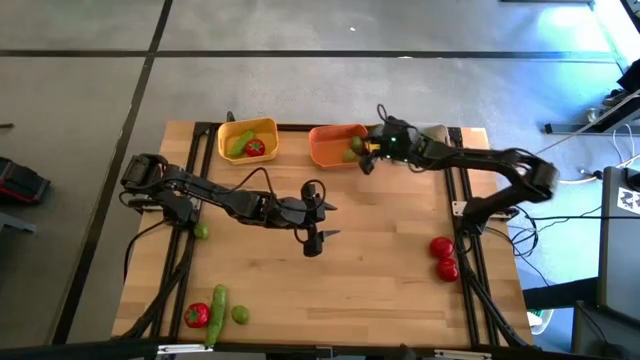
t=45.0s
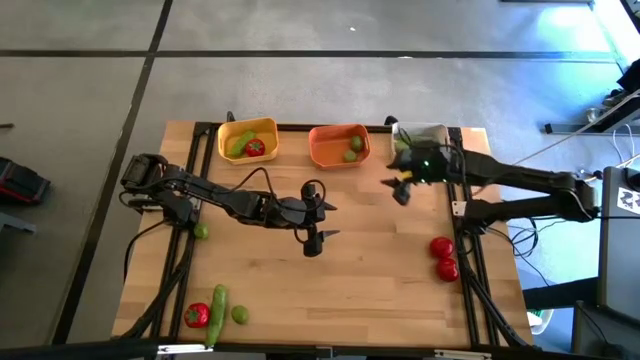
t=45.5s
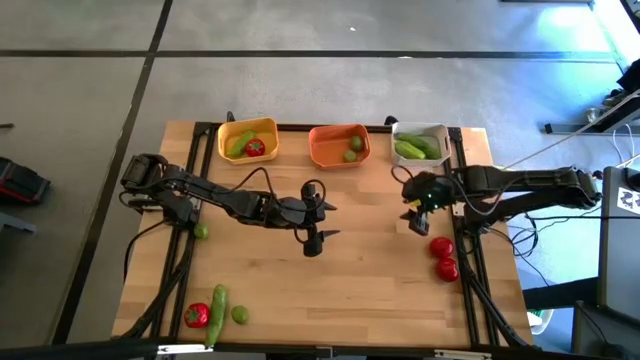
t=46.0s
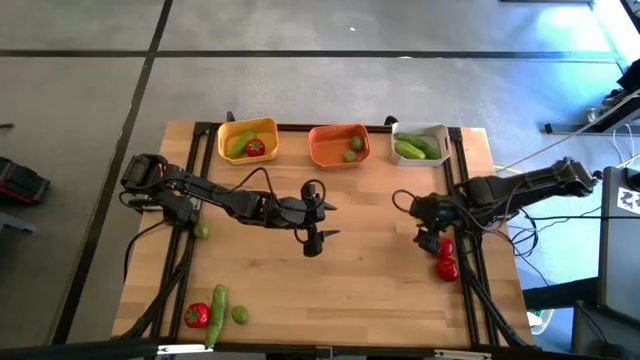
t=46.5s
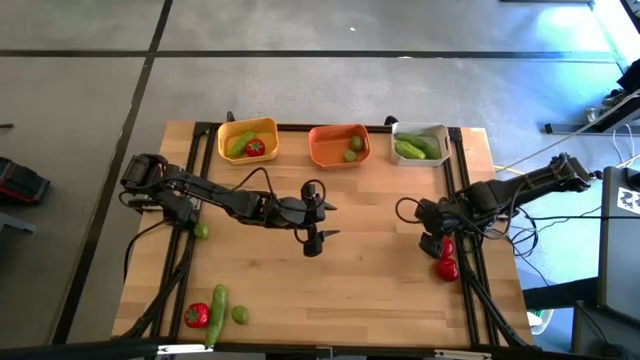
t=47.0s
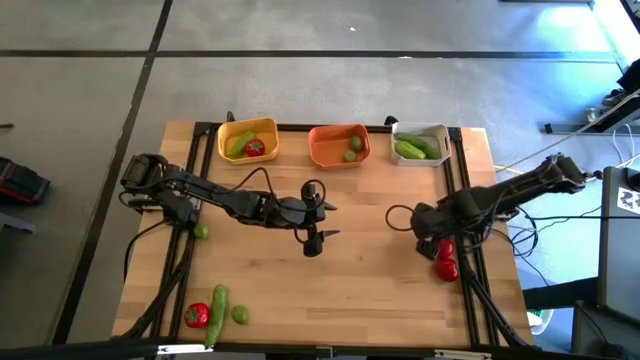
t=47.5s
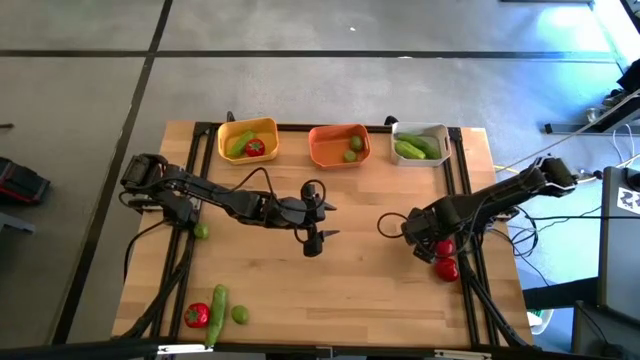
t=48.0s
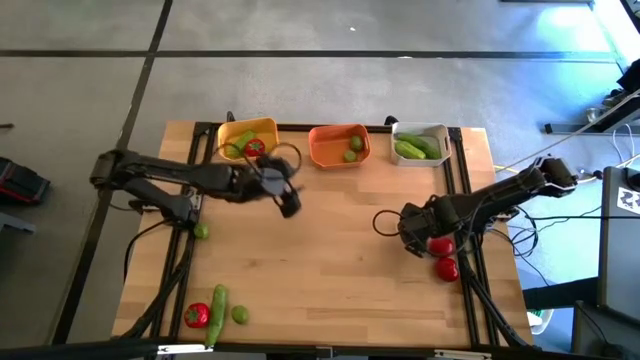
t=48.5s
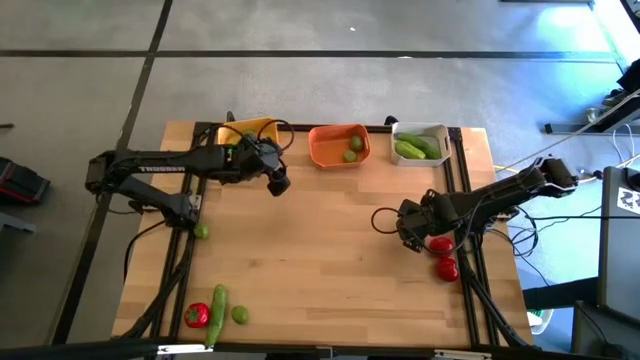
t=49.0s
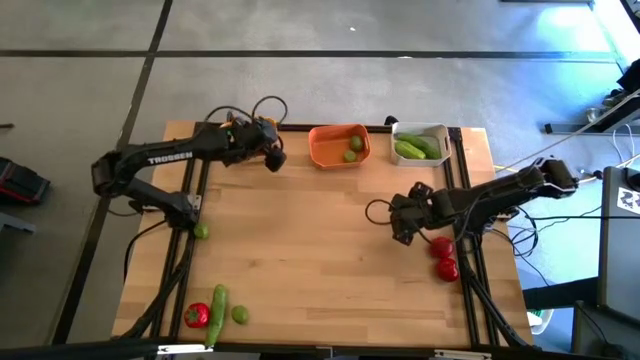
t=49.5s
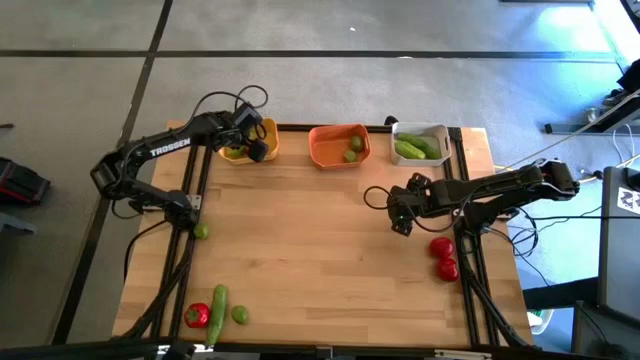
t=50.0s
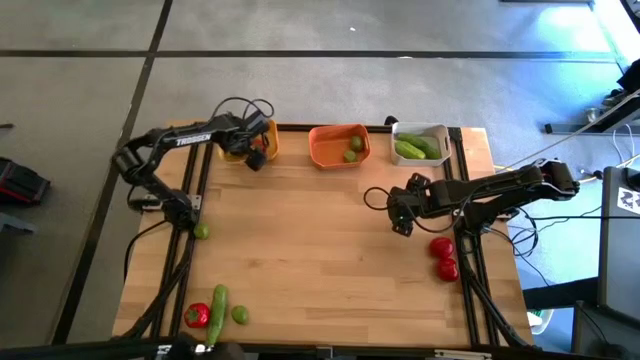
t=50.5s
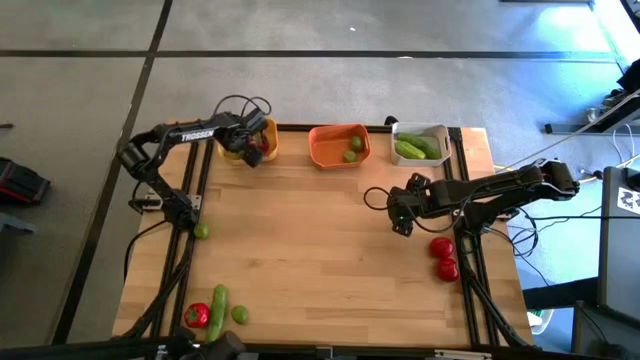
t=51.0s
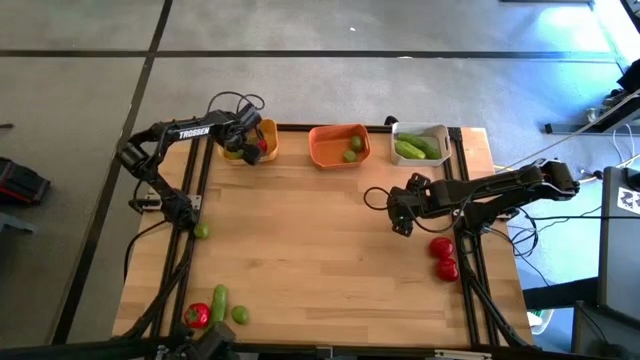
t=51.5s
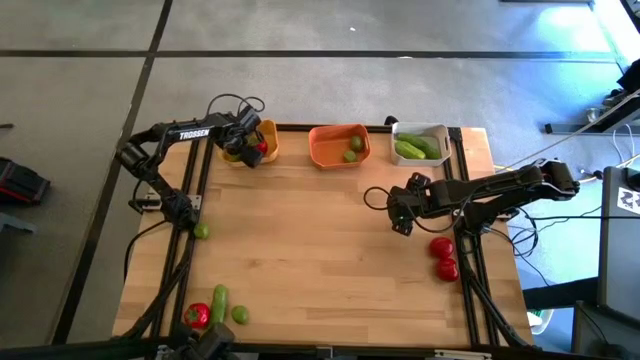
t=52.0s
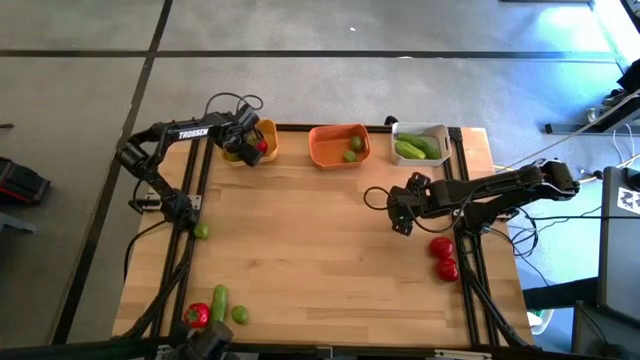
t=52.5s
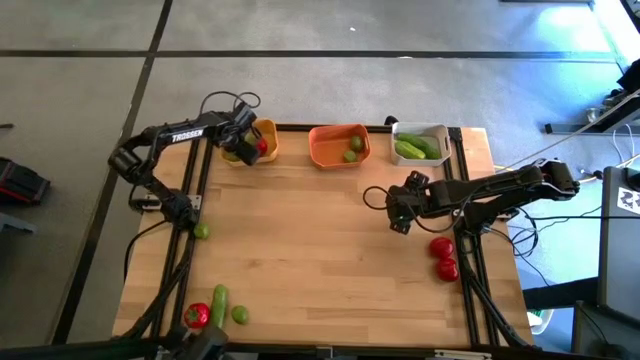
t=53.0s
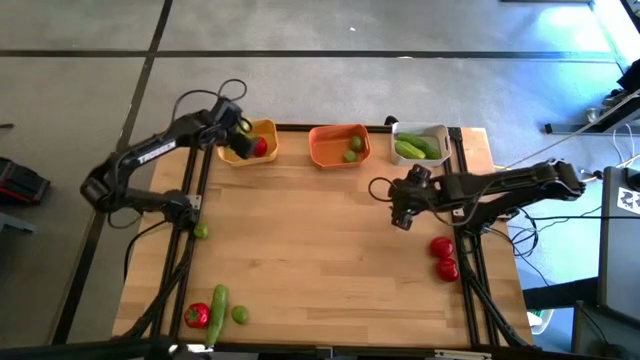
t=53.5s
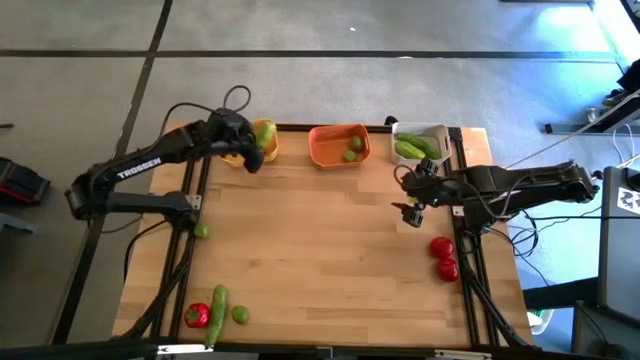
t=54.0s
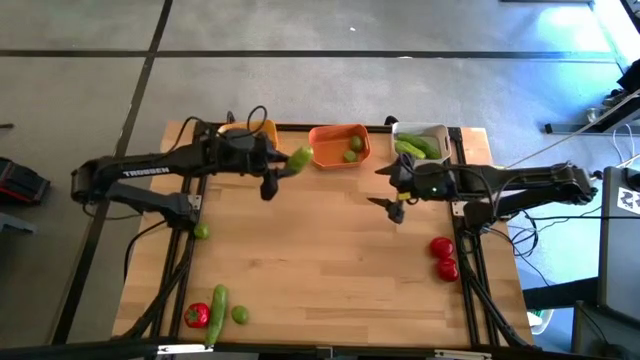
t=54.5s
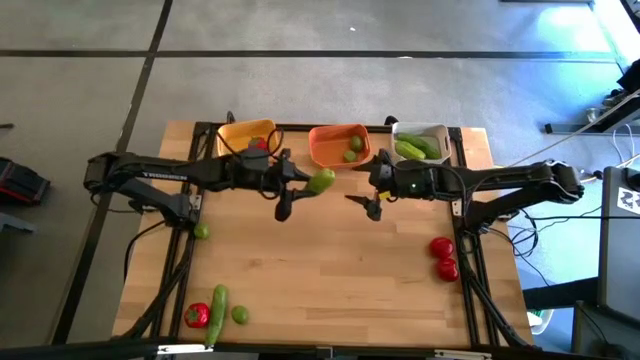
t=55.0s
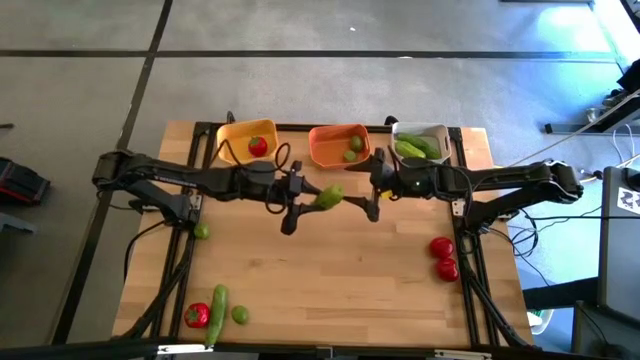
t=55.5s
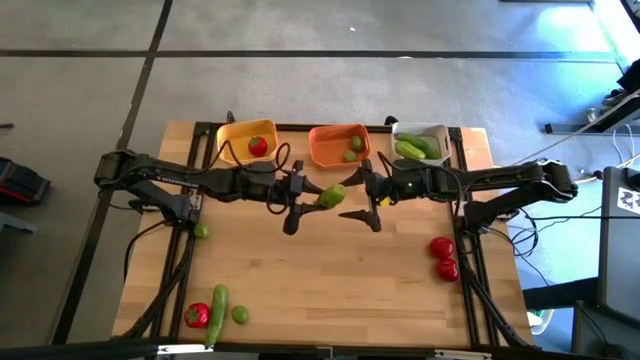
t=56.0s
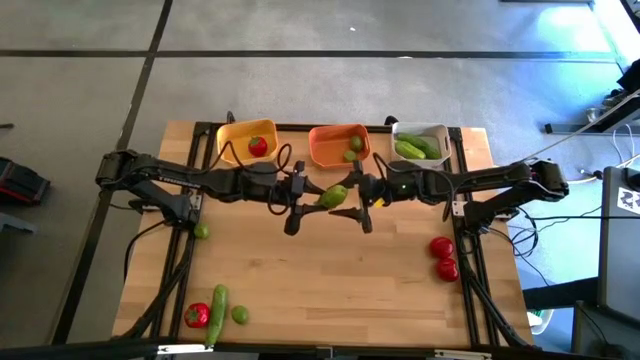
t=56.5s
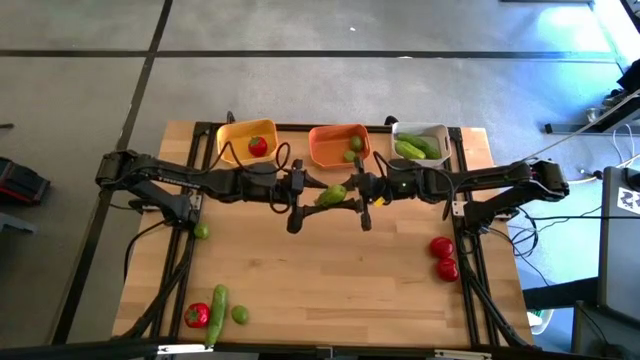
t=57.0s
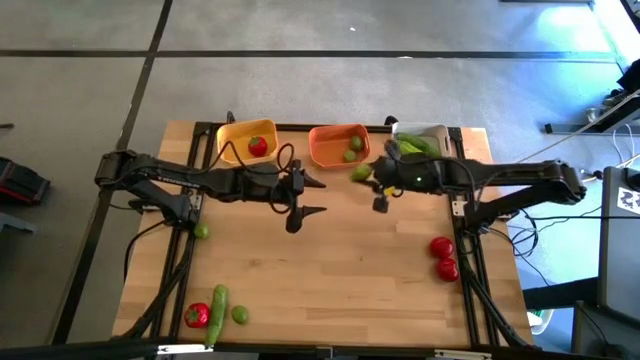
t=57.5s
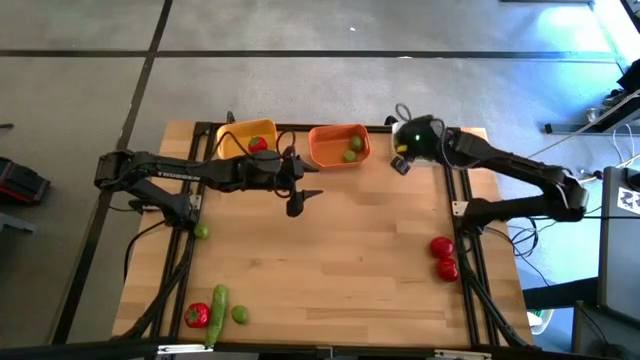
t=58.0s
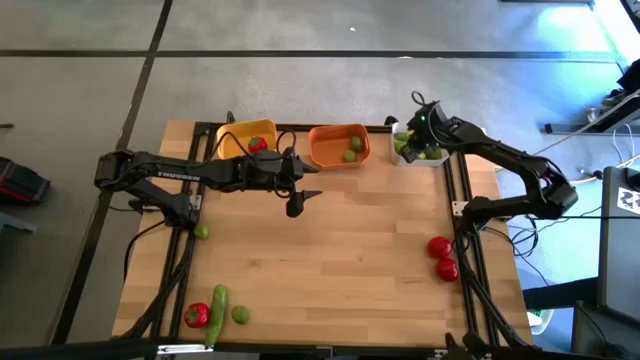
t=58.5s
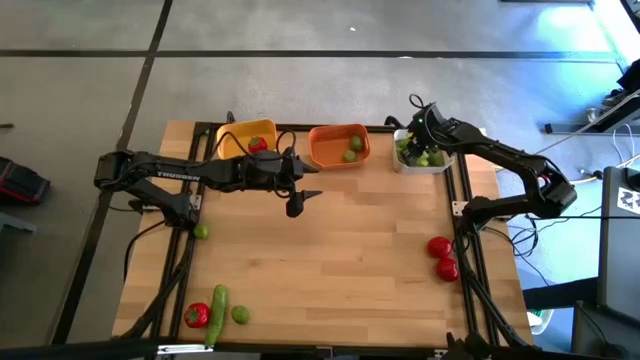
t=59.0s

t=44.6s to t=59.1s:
Task: Sort produce into baskets
Put the cucumber into the white bin

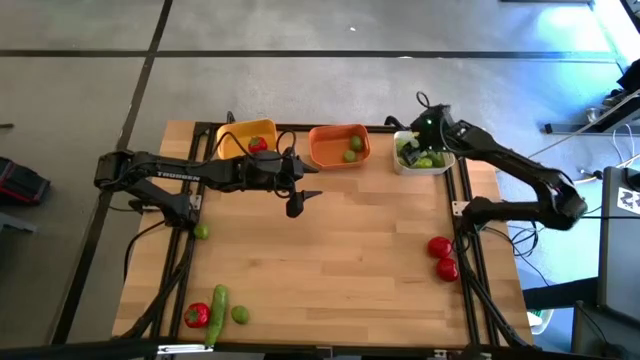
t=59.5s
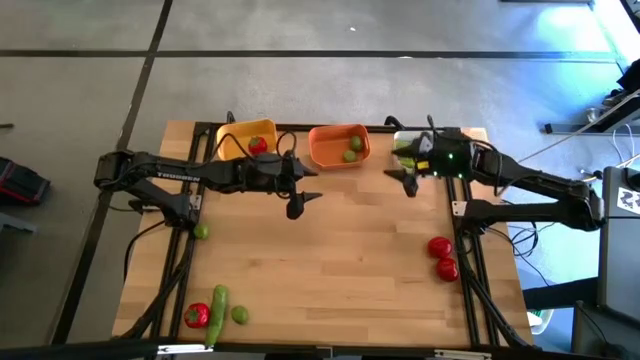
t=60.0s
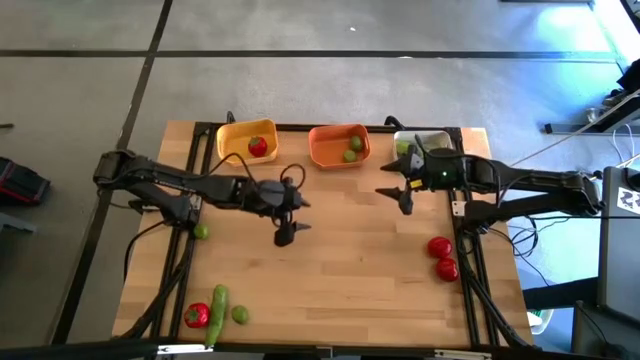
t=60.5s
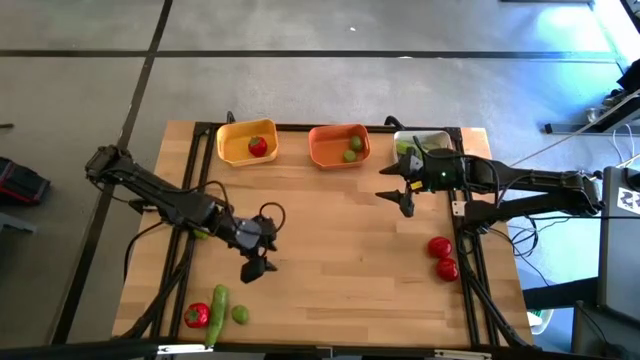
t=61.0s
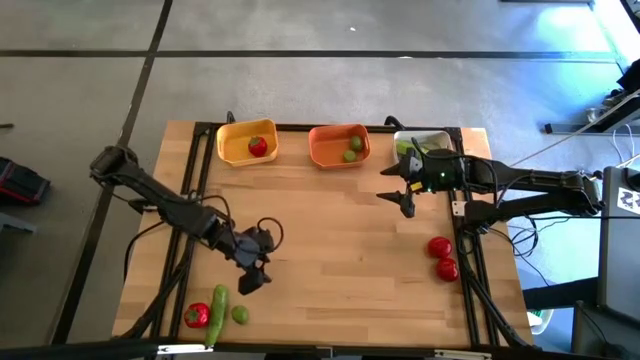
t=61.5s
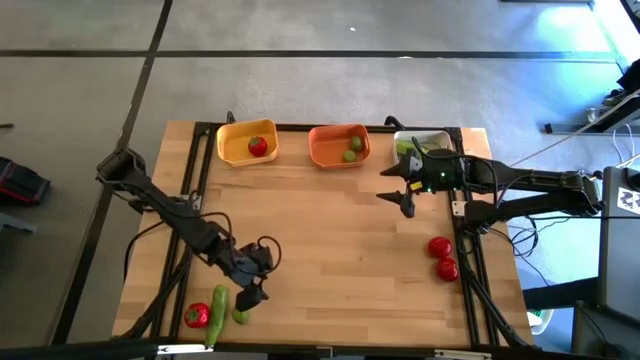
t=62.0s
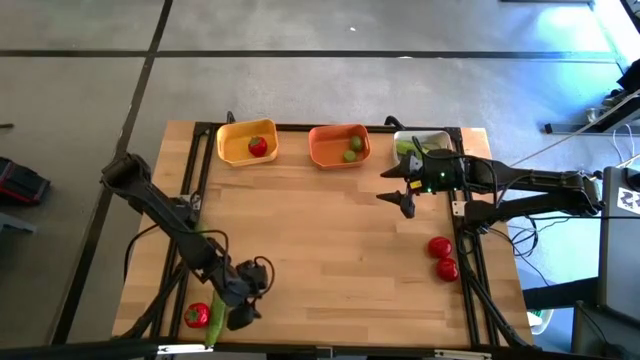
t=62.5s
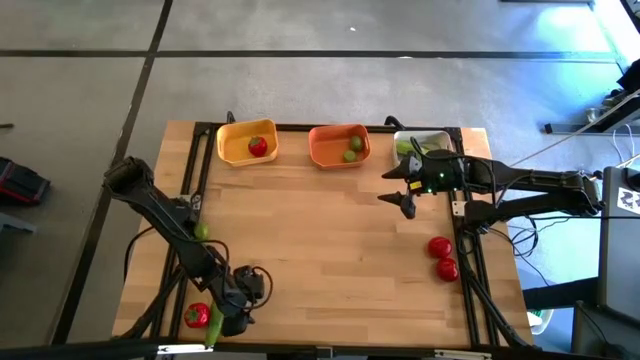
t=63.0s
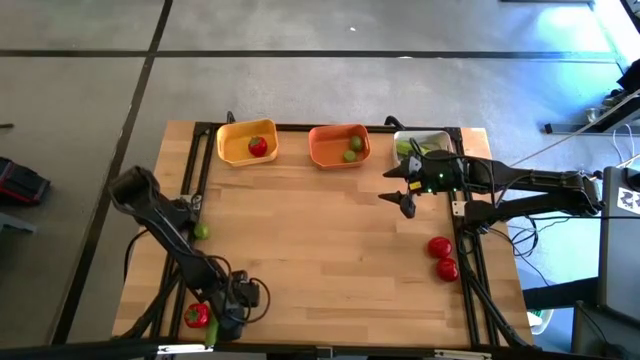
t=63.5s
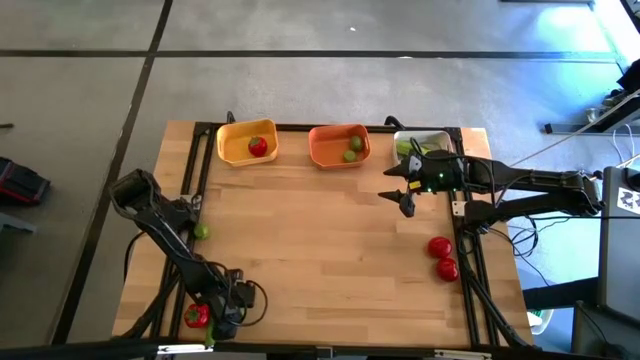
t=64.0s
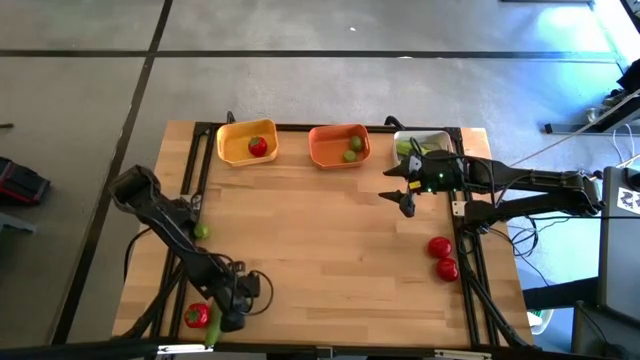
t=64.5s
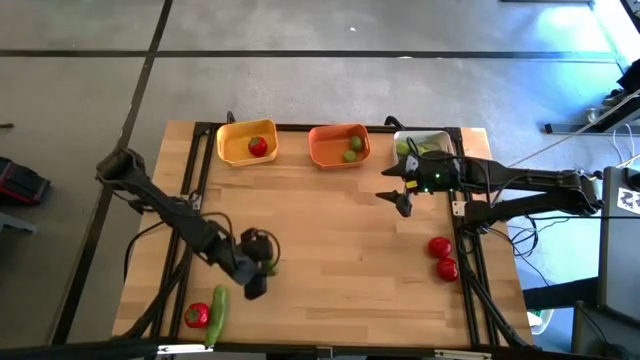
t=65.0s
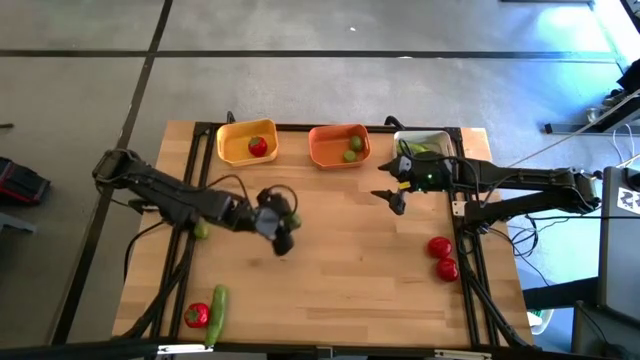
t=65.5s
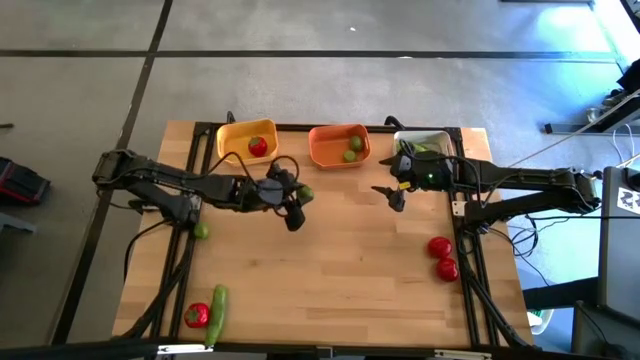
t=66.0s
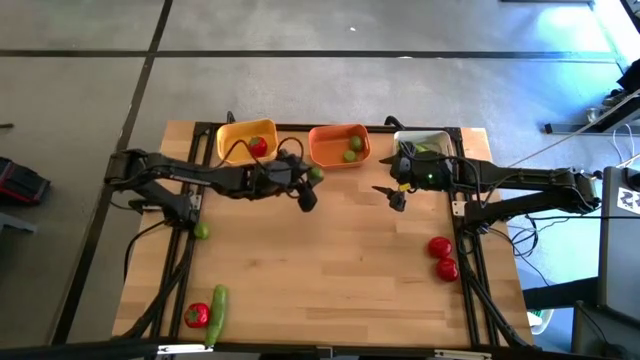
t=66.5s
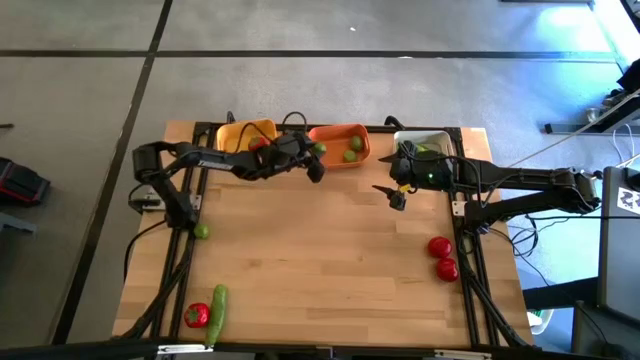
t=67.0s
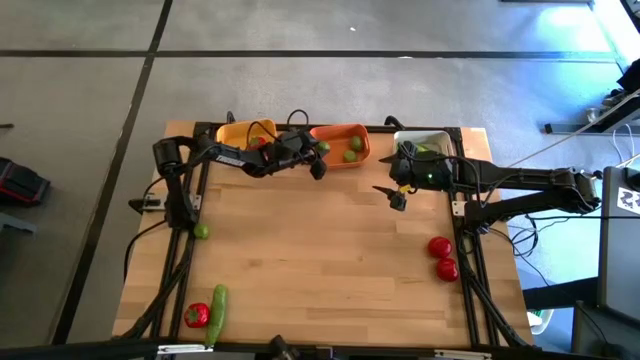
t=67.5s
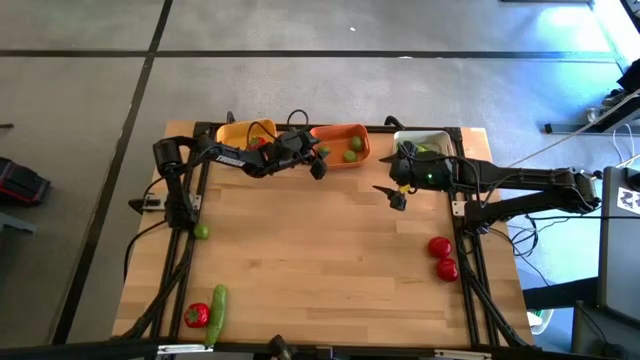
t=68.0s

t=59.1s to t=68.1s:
Put the bottom lime into the orange bin
